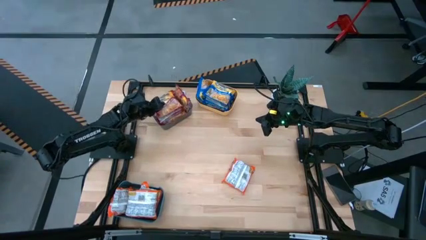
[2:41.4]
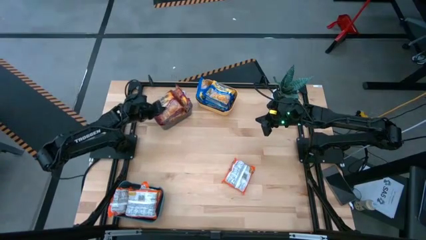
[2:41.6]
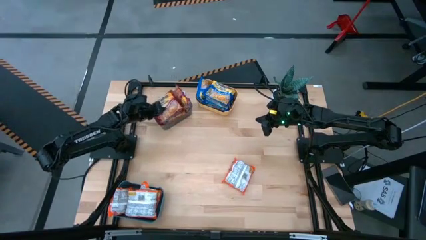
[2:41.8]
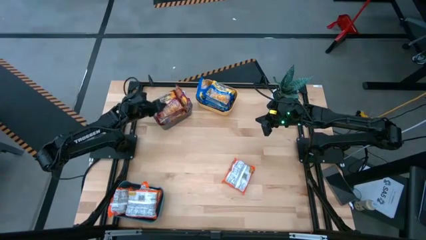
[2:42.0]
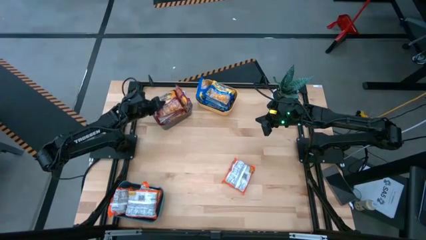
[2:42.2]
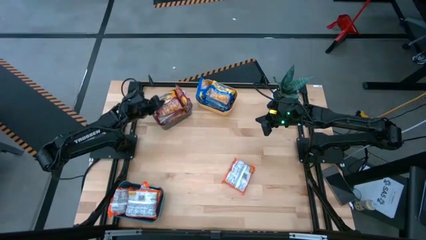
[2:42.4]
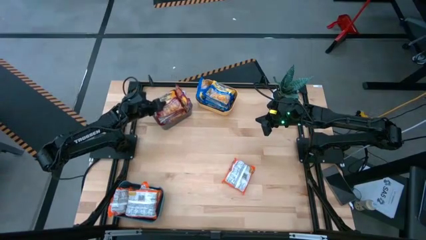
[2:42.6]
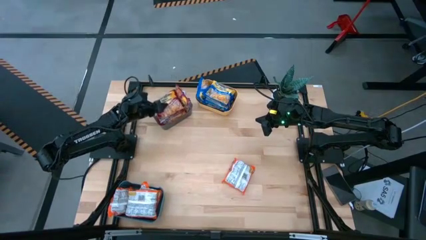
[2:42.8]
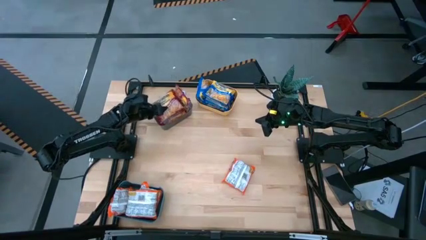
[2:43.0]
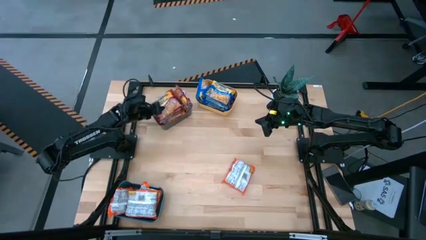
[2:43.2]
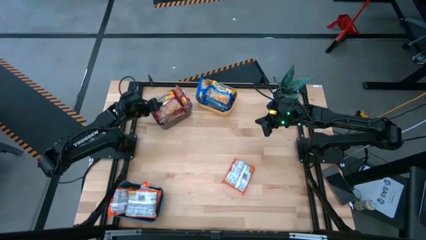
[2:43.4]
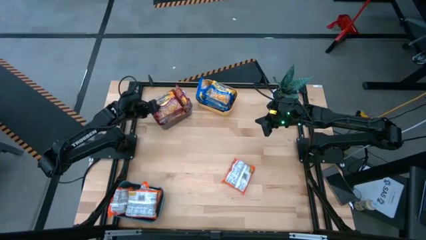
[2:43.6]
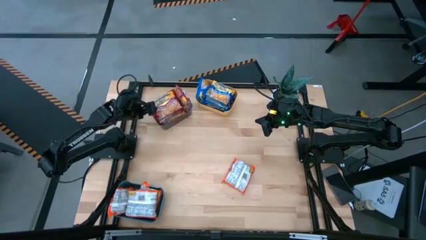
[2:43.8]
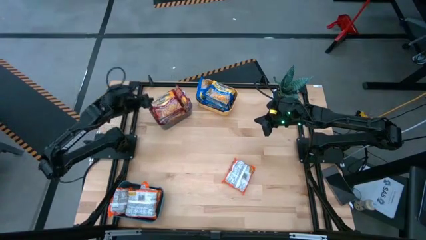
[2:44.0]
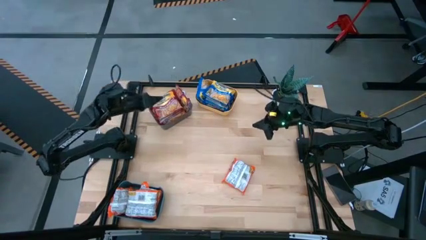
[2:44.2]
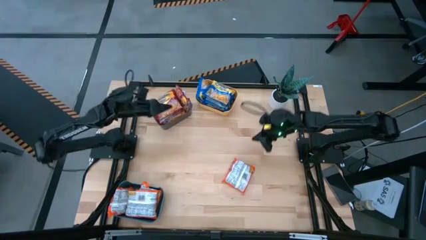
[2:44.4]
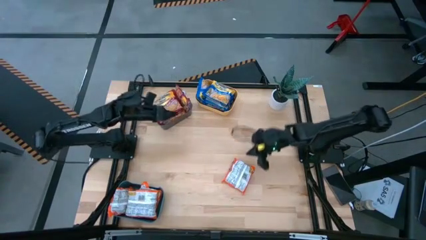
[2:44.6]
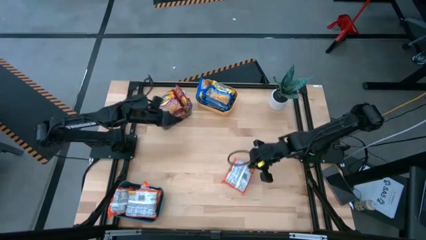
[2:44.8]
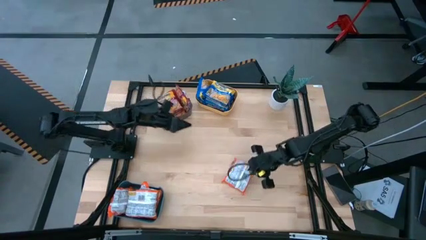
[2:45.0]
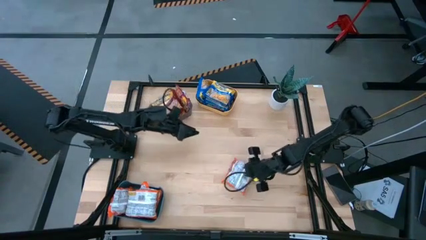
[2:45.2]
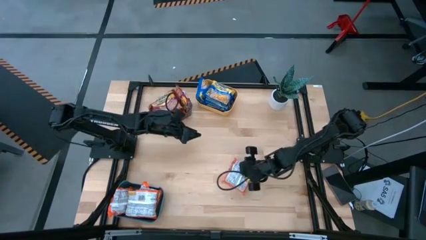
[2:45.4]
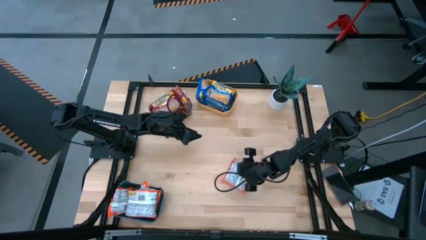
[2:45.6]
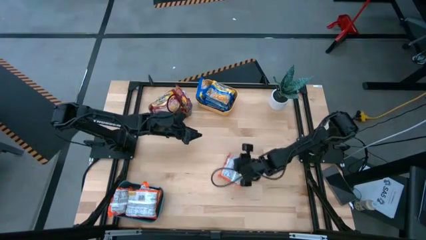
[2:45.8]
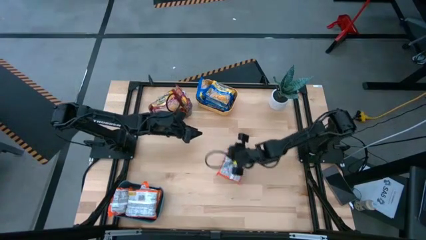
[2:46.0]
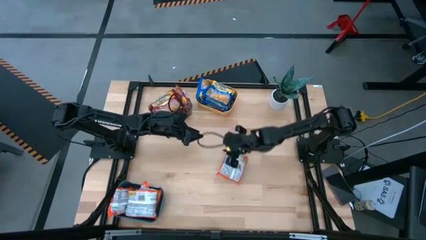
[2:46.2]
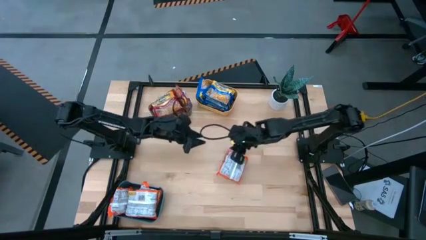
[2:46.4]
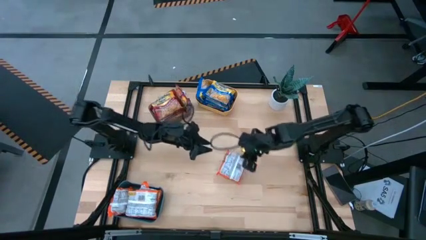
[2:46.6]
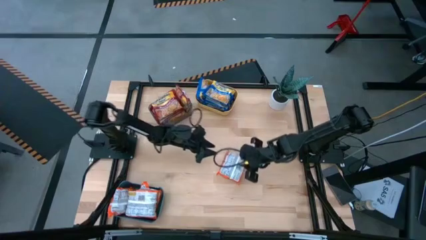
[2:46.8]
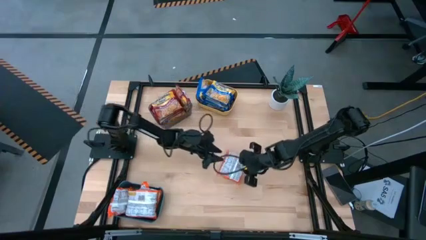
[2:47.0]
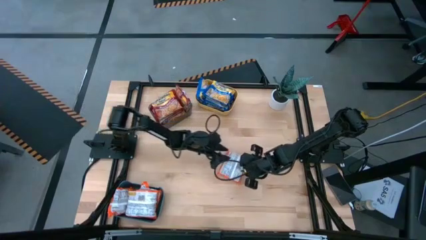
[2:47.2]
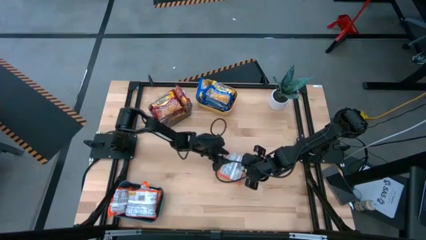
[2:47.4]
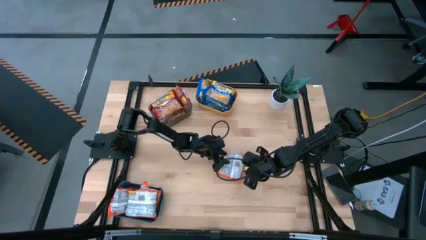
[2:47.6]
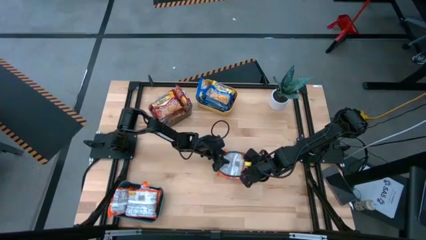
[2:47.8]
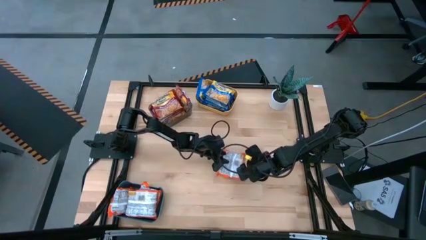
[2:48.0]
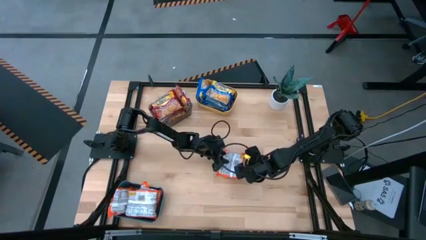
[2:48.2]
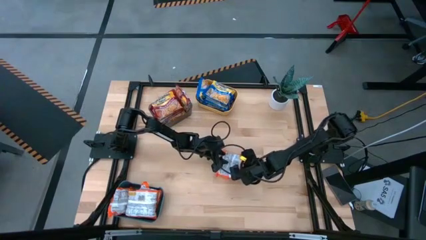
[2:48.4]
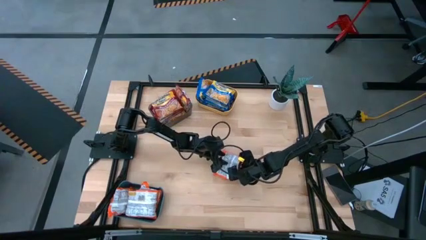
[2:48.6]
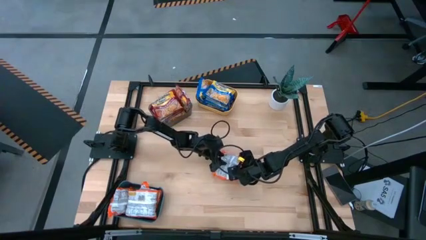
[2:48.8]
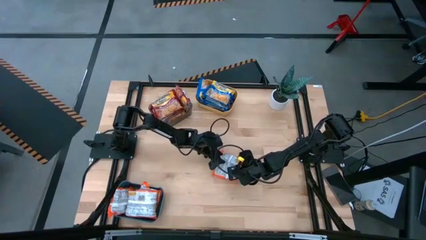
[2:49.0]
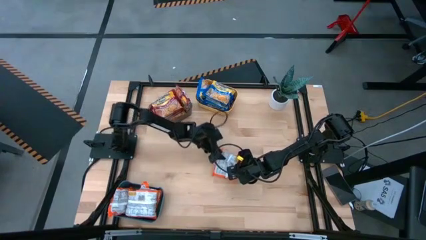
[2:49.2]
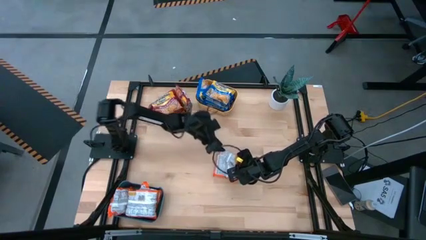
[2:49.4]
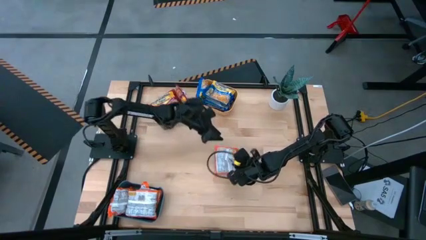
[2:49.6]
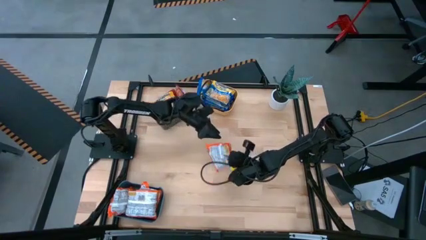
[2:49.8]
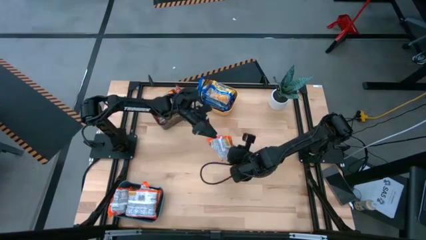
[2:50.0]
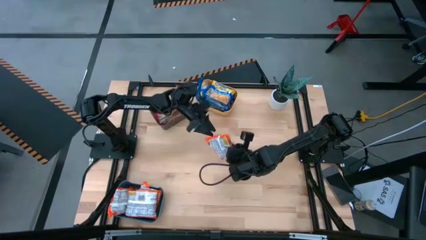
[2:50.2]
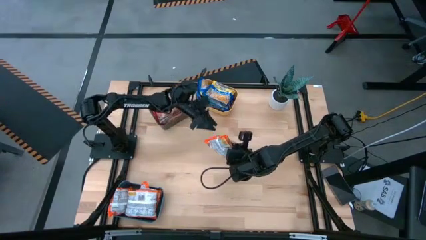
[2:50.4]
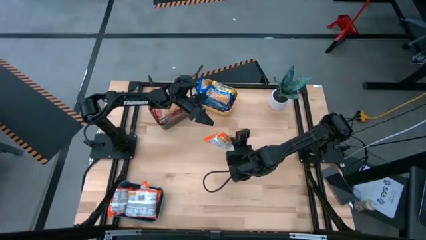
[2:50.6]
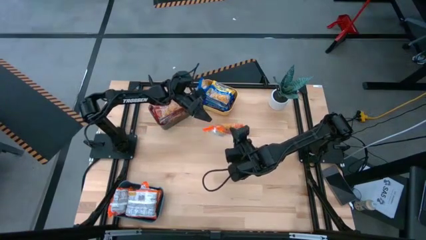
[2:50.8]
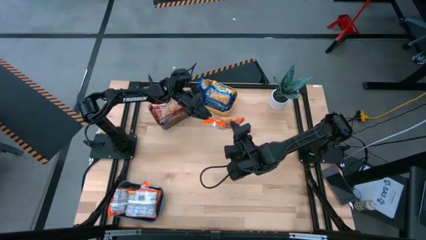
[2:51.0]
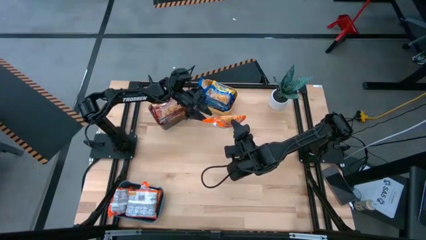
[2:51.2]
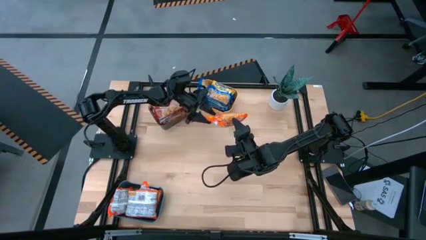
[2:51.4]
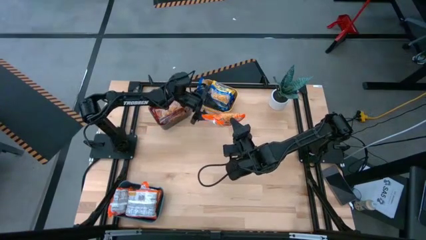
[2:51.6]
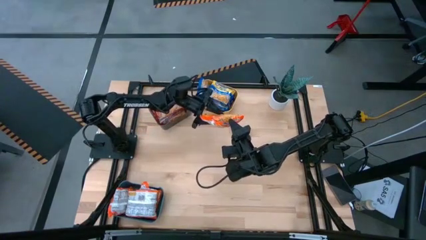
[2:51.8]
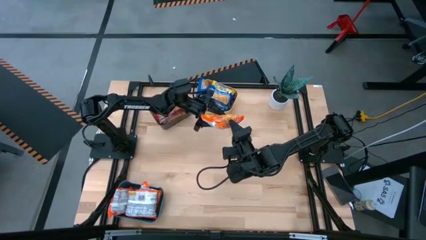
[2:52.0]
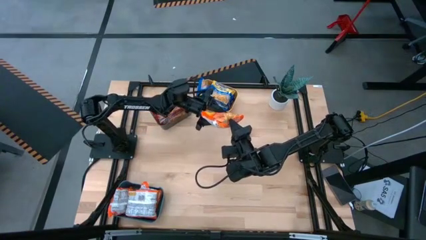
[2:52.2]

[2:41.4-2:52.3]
Task: Sort Maruchan noodles
Put the orange noodle pack into the blue bin

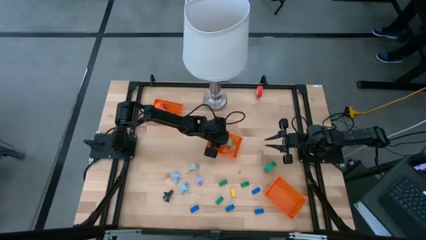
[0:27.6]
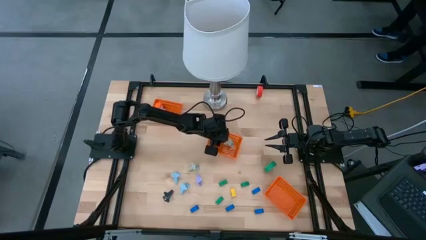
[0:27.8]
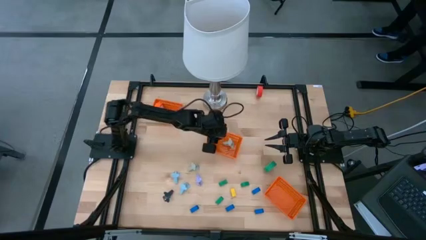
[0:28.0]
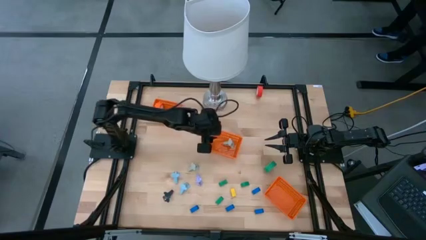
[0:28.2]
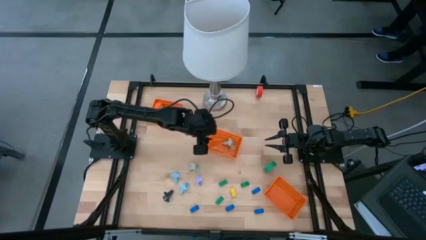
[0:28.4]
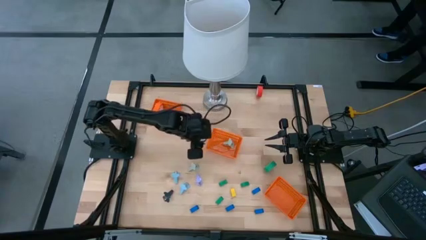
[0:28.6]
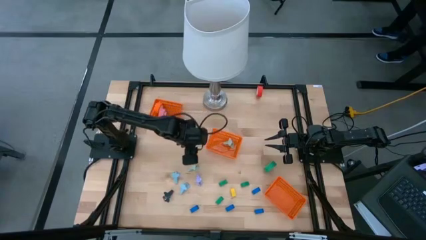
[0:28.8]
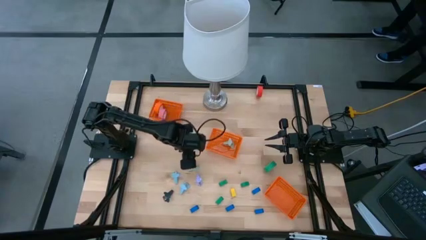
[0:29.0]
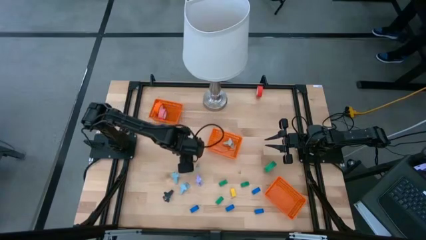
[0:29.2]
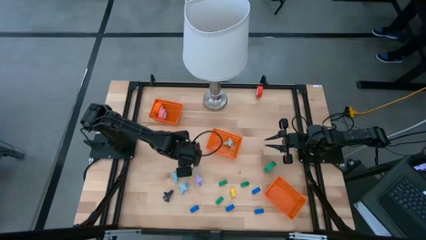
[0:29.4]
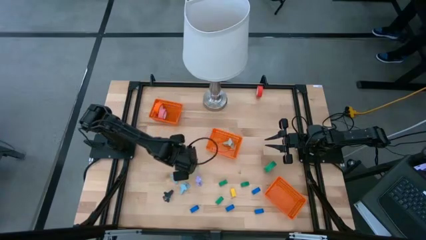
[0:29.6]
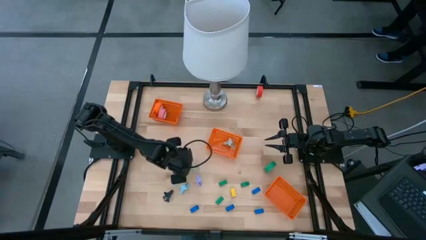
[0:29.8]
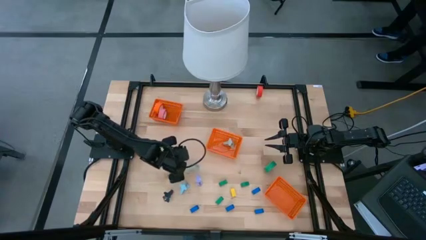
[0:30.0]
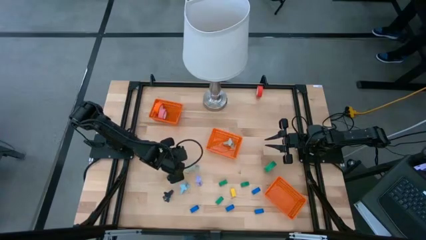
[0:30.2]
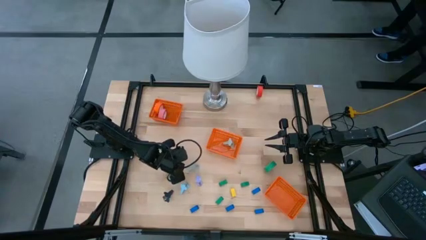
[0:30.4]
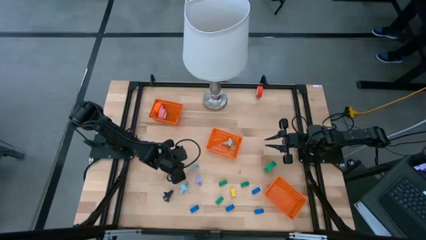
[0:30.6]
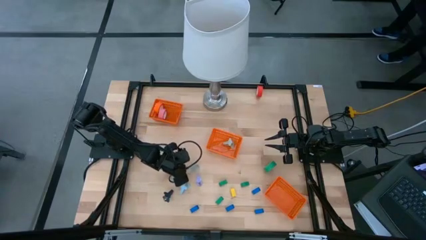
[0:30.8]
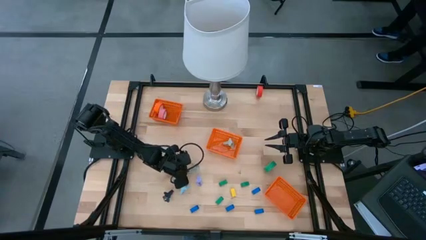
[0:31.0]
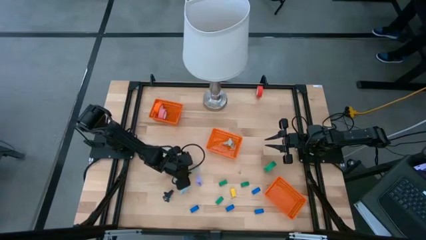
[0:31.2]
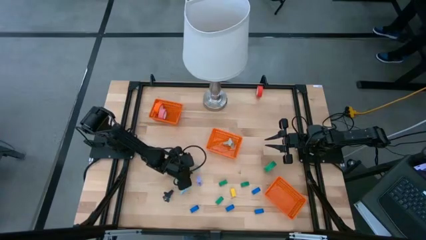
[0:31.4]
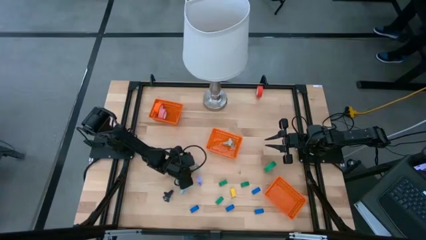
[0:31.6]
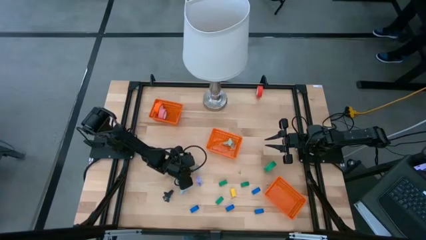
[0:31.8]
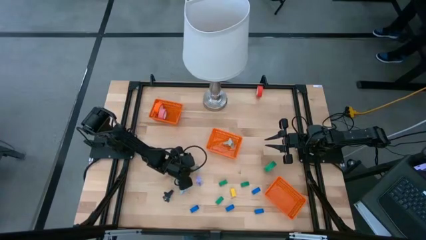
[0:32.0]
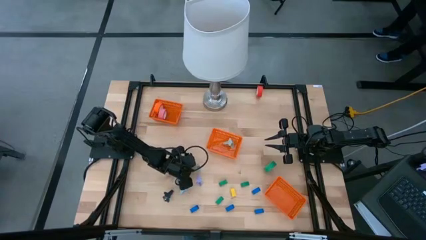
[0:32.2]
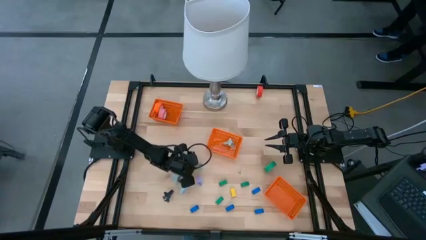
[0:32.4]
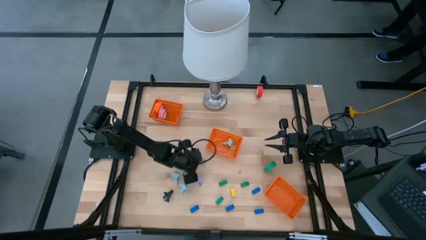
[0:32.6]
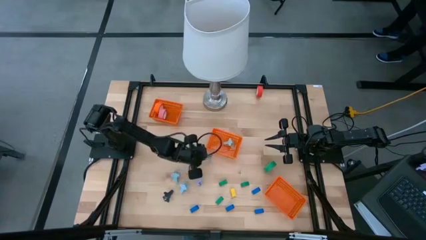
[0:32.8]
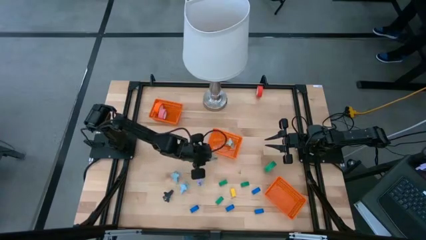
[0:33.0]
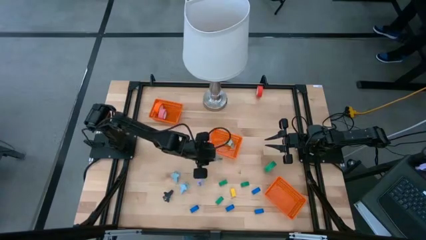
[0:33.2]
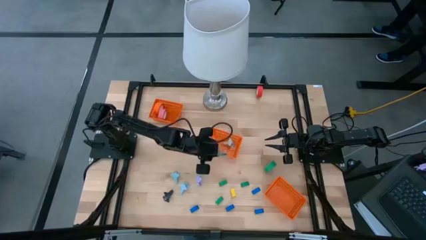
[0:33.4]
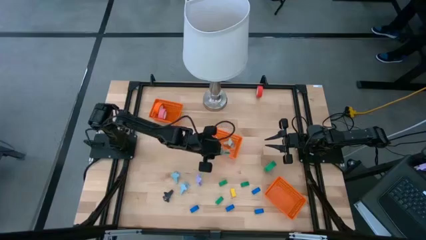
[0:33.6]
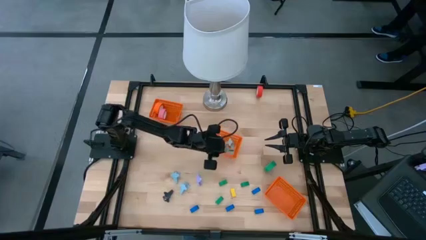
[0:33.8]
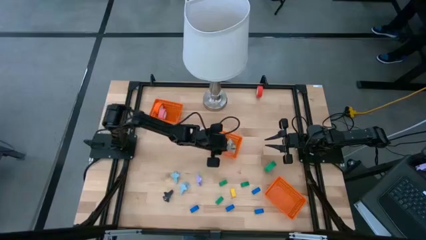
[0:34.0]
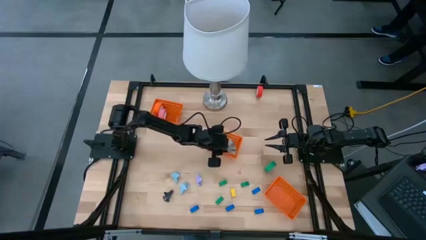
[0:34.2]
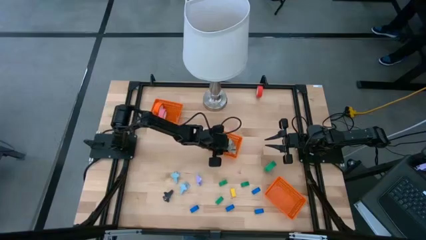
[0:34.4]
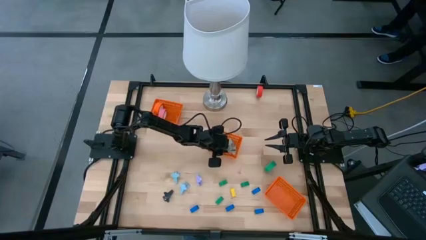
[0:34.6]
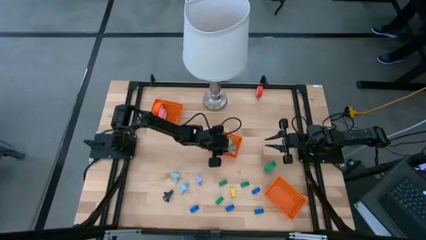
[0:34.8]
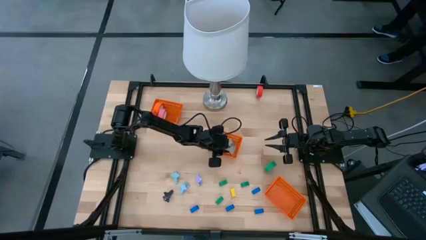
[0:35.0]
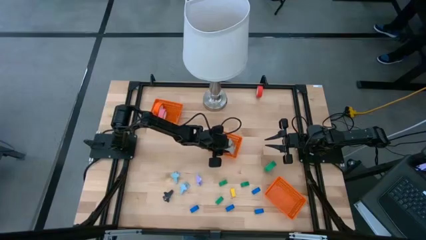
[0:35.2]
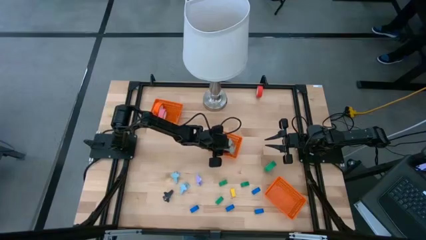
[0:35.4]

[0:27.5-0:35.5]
Task: Pick and place Stapler, Stapler remover, tape
Put the gray staple remover into the middle orange bin
